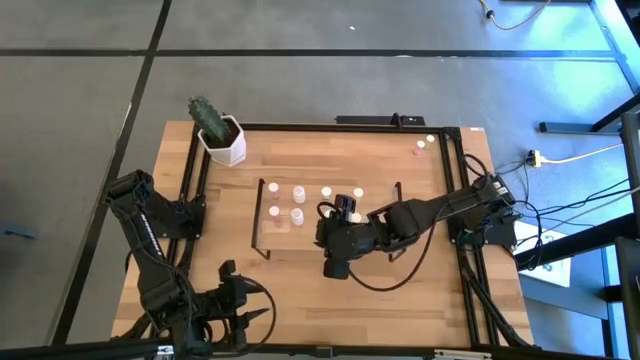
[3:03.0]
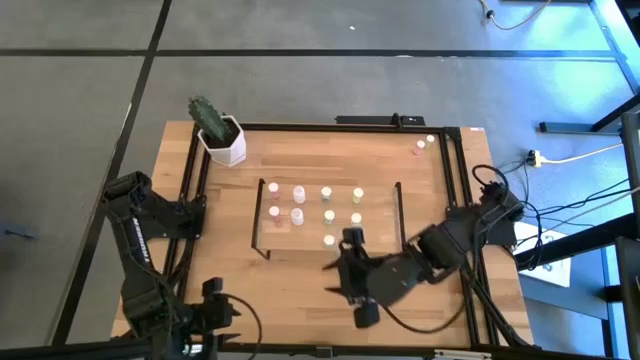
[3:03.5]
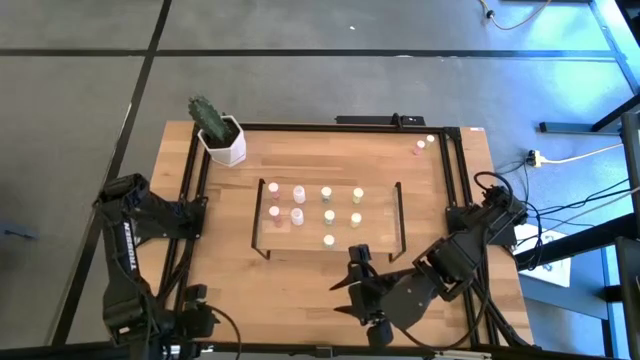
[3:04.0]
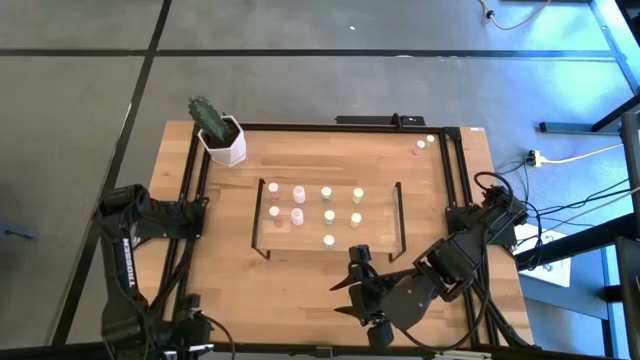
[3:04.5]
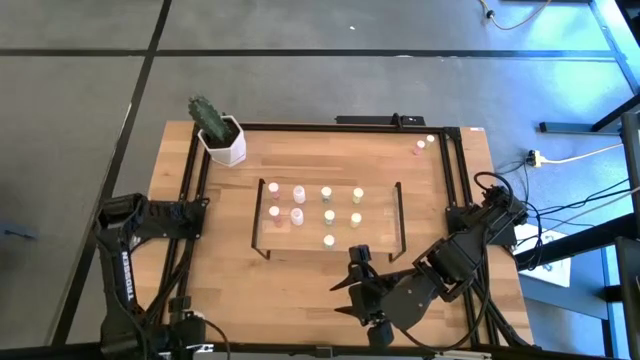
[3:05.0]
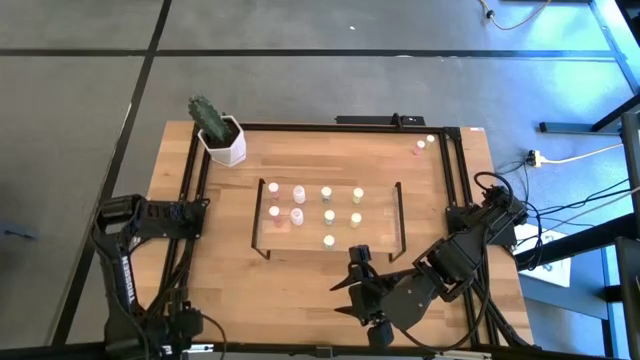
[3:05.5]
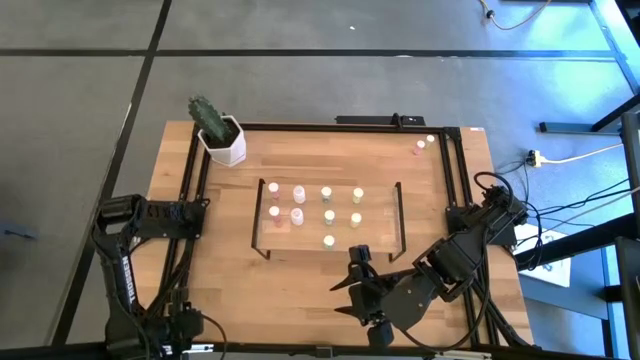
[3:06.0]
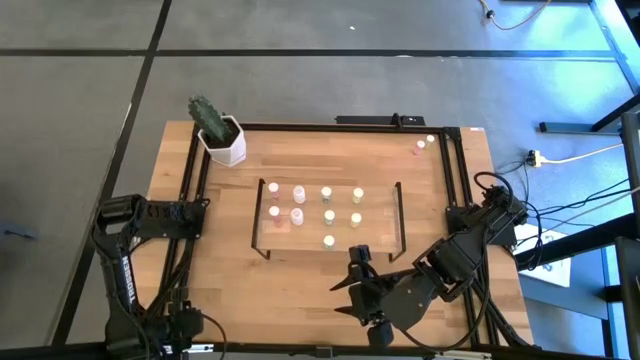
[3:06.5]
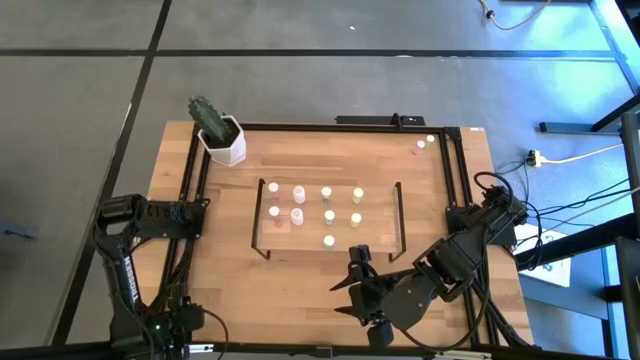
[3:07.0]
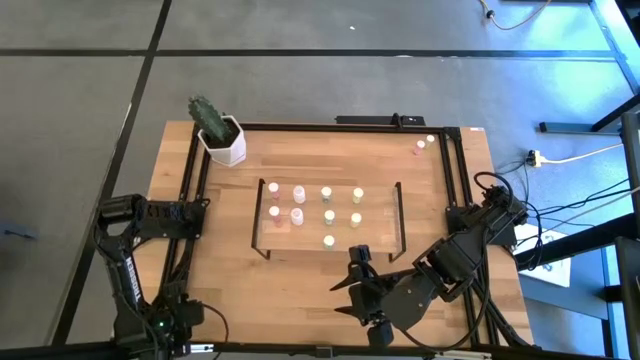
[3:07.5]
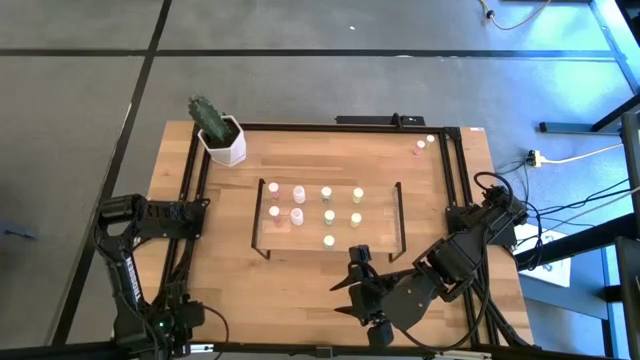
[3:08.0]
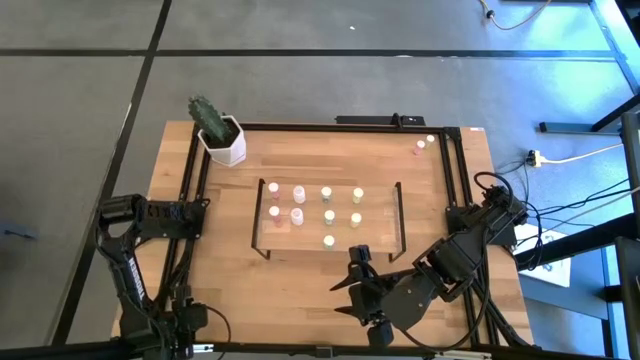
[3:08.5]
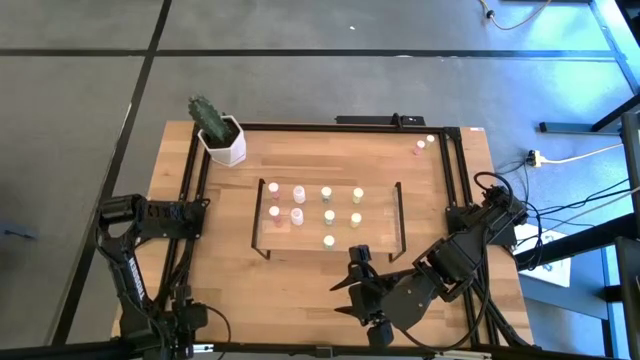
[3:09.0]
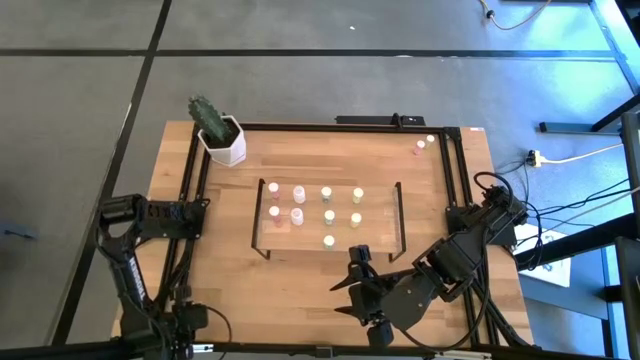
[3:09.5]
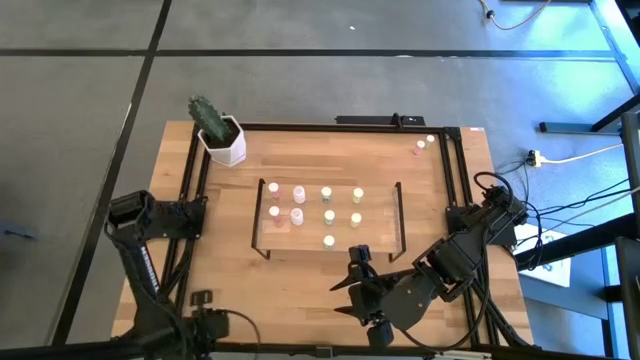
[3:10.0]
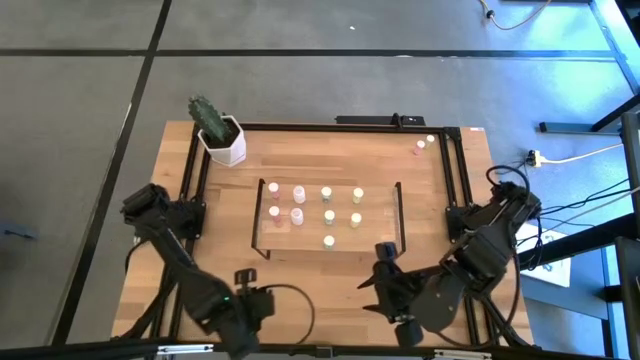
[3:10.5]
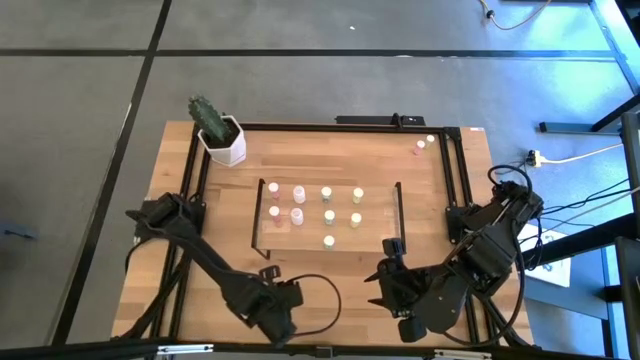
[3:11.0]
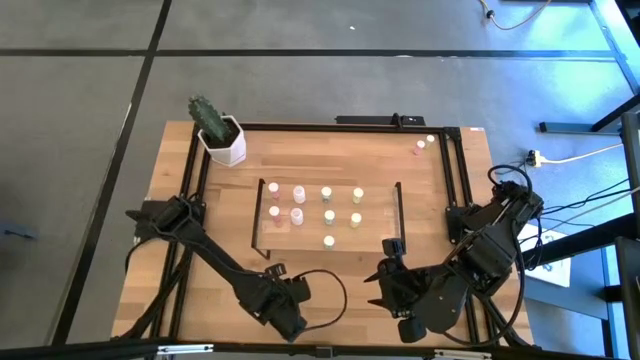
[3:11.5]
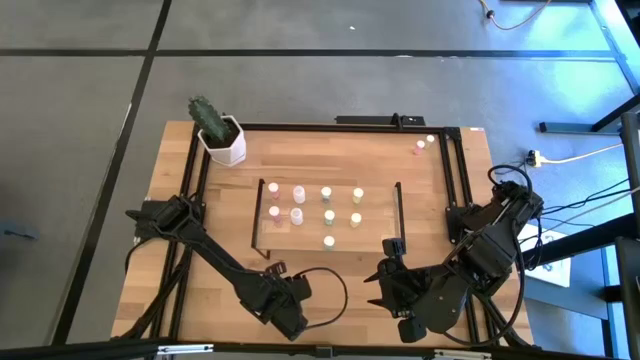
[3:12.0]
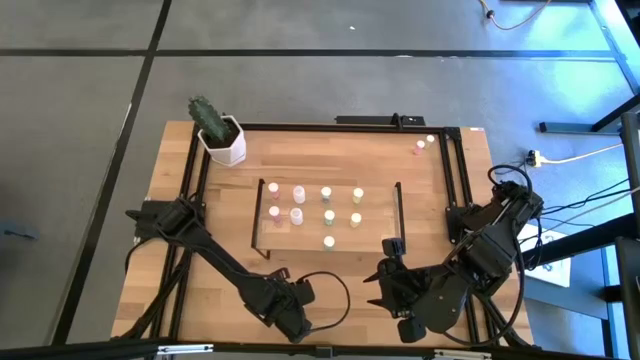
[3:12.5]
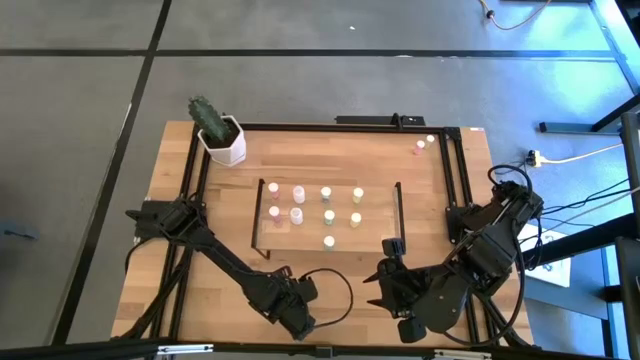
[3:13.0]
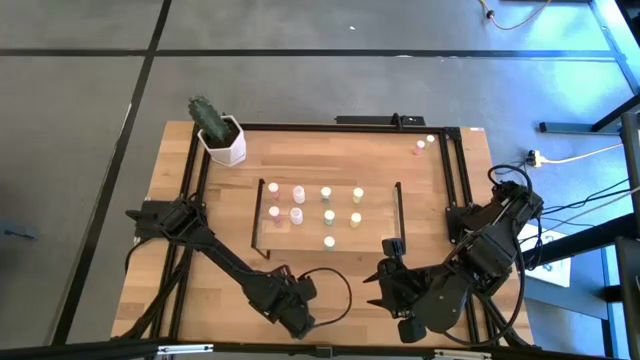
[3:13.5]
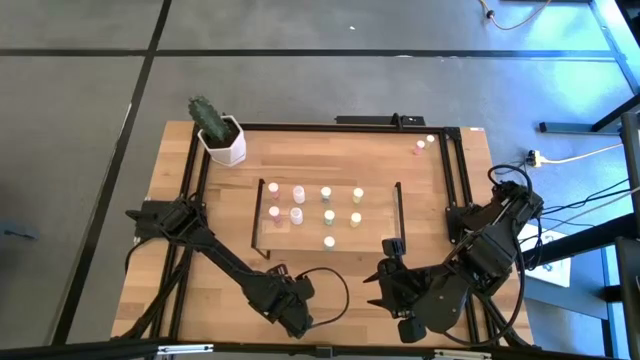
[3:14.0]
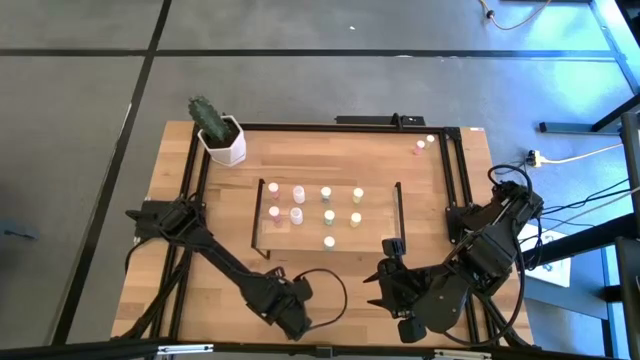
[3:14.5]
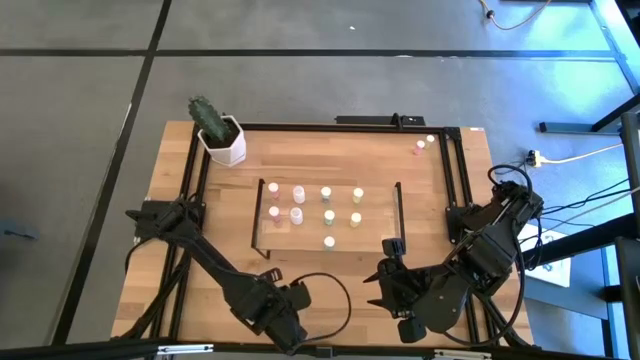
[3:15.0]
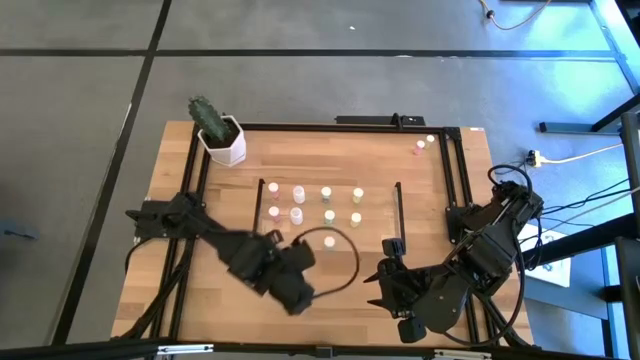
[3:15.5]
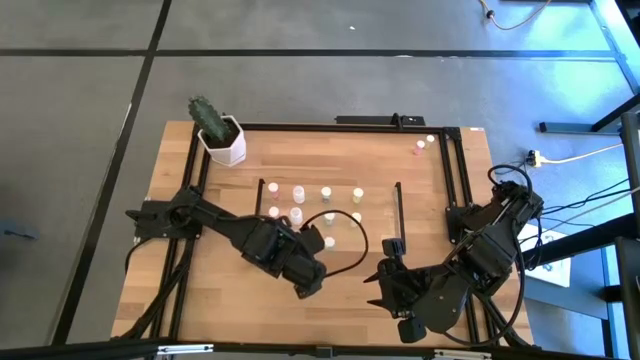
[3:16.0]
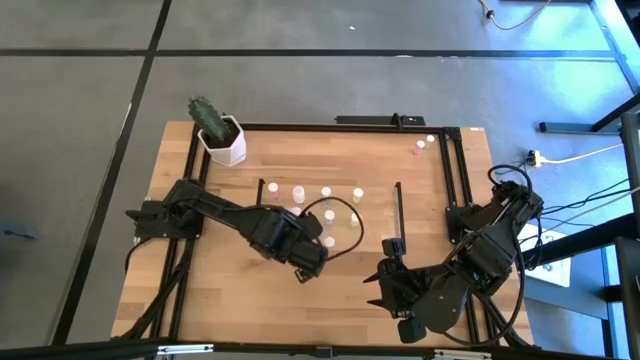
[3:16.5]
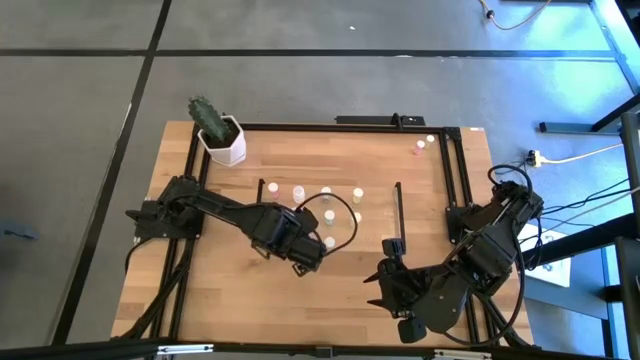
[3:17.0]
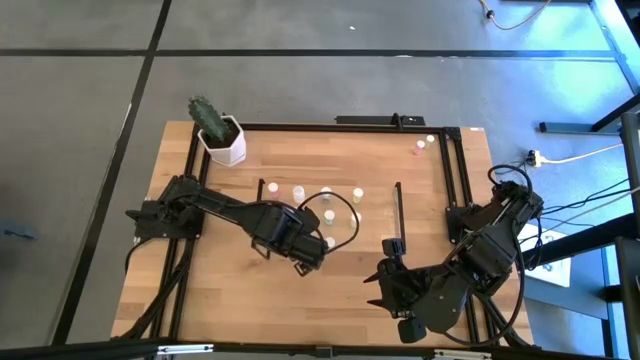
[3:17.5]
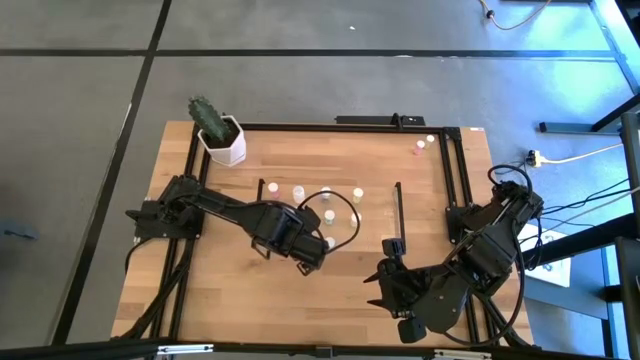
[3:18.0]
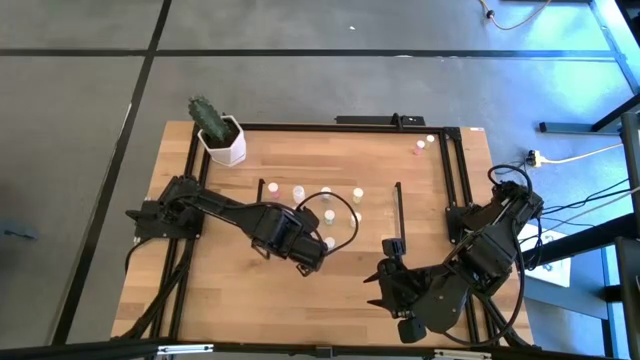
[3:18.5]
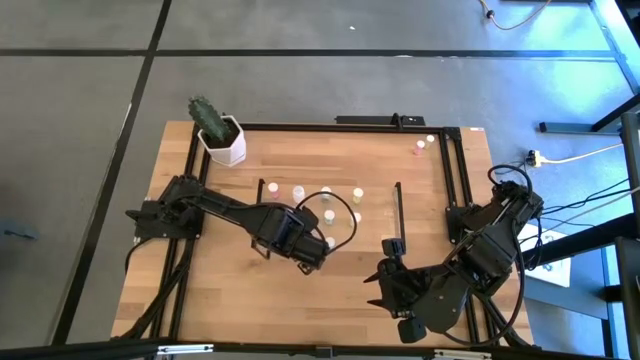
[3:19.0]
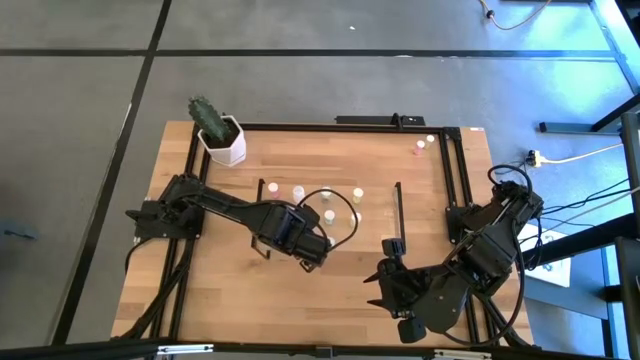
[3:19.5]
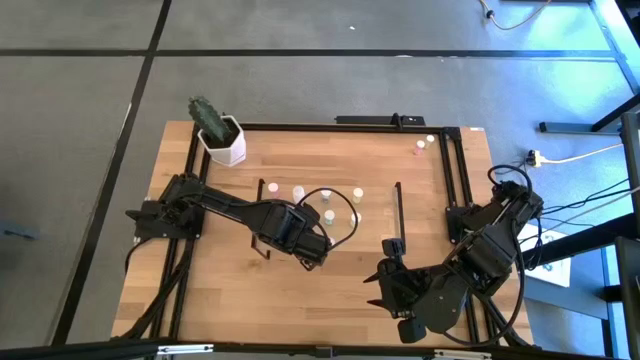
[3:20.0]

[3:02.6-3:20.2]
Task: Pick and place medicine bottles onto shelf by color
Put the white pill bottle on the shelf aligned with the other white pill bottles

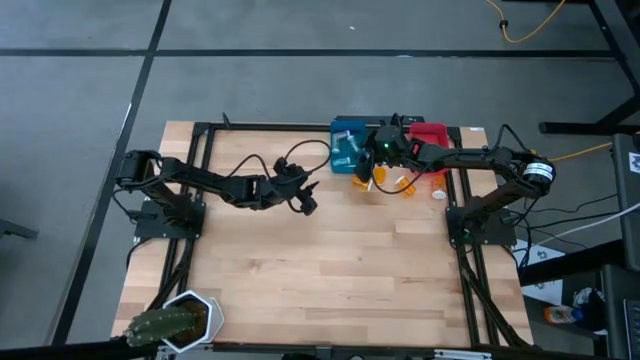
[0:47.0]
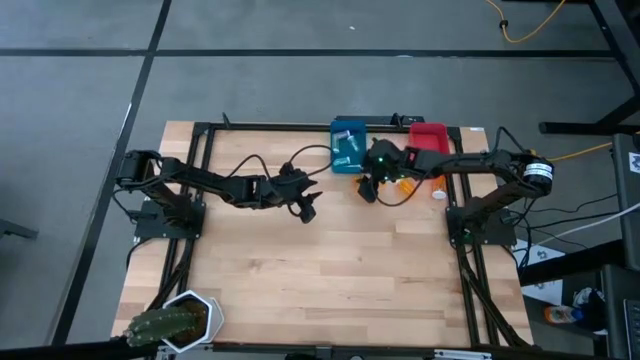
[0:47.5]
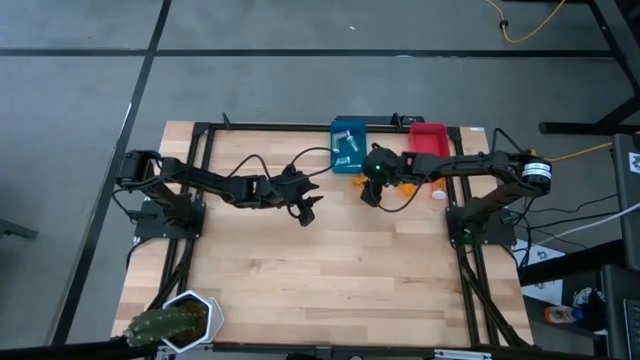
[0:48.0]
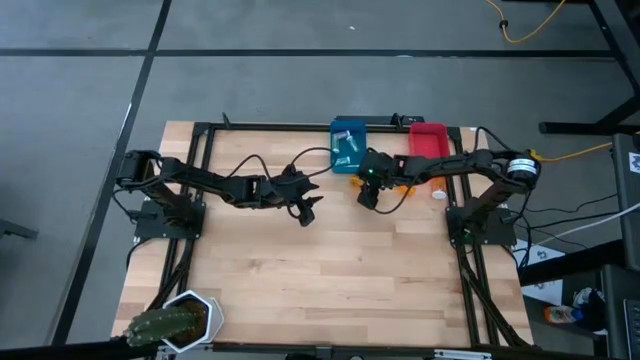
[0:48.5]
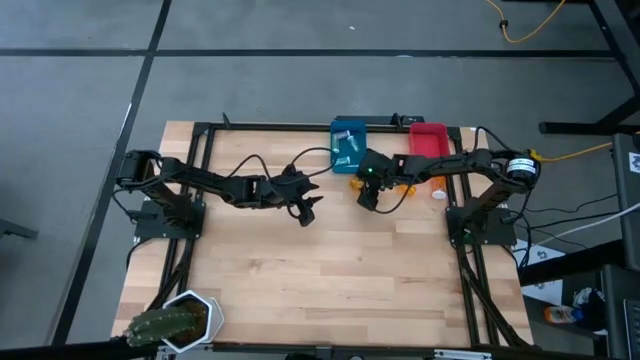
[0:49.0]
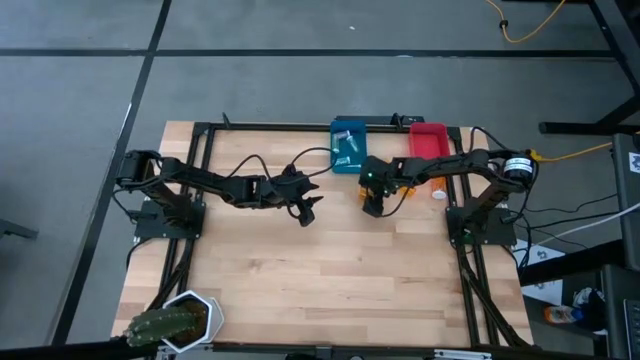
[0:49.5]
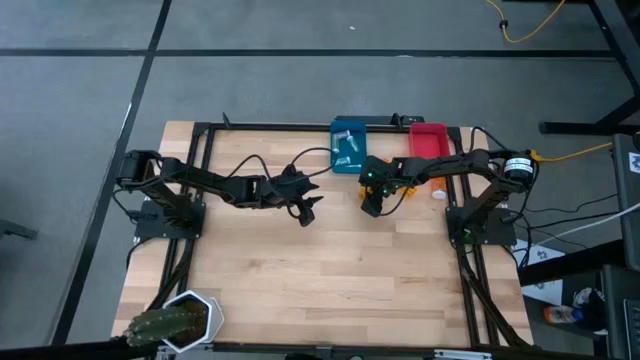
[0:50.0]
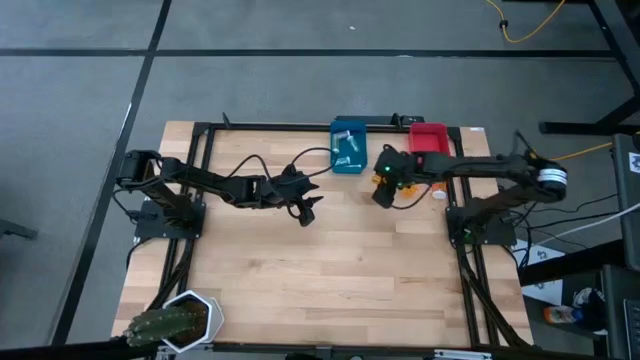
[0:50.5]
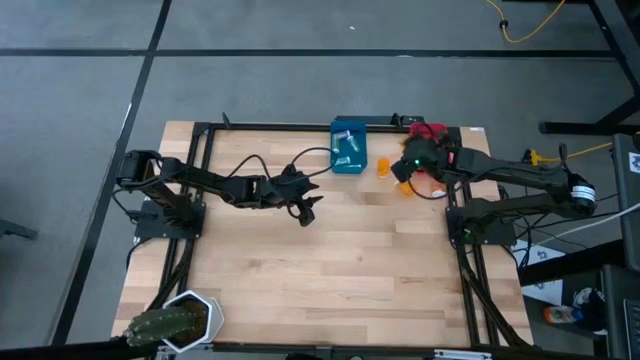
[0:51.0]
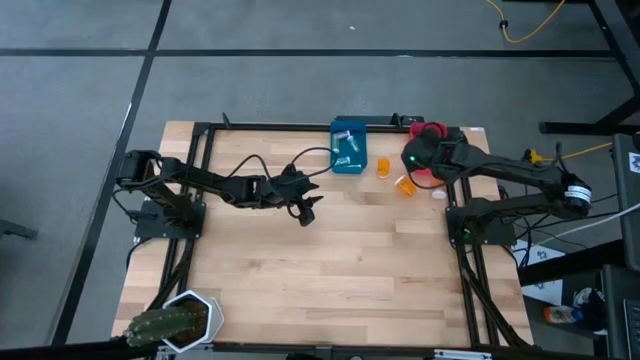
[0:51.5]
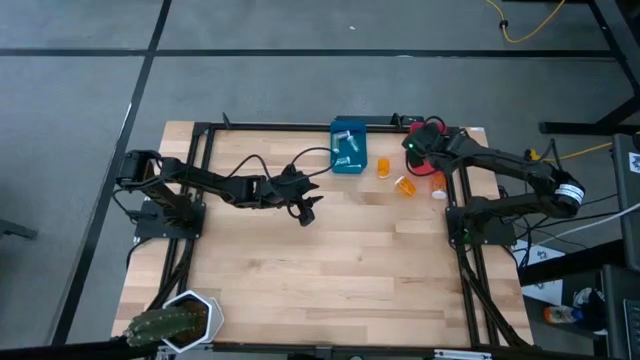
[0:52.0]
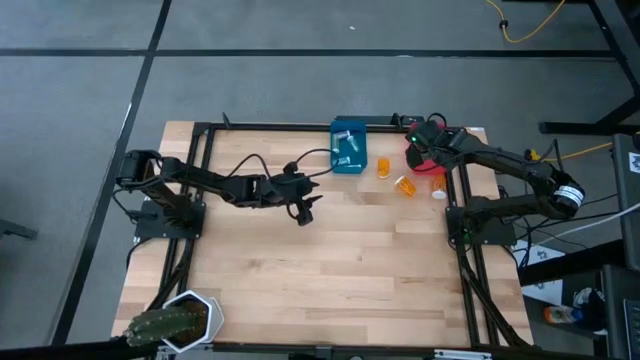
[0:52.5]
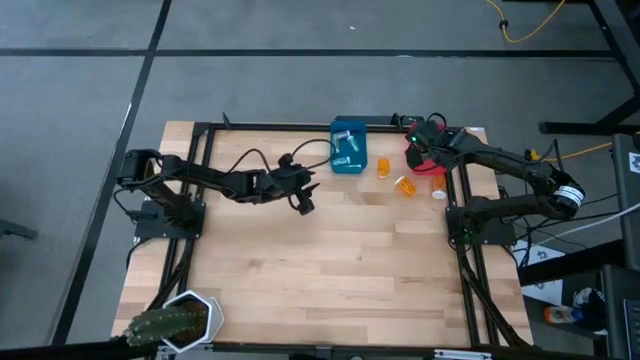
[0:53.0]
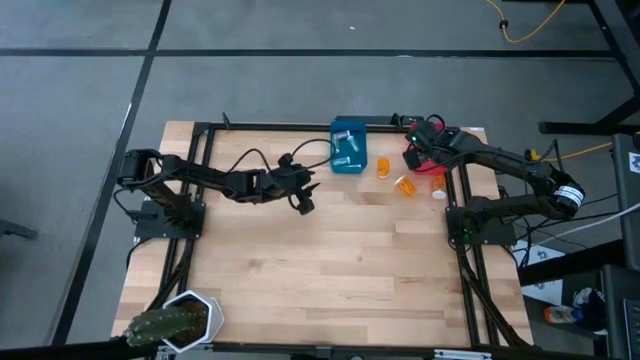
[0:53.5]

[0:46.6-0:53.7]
Task: Pick and place medicine bottles into bin by pill shape (circle, oval)
Put the big orange pill bottle into the pink bin
